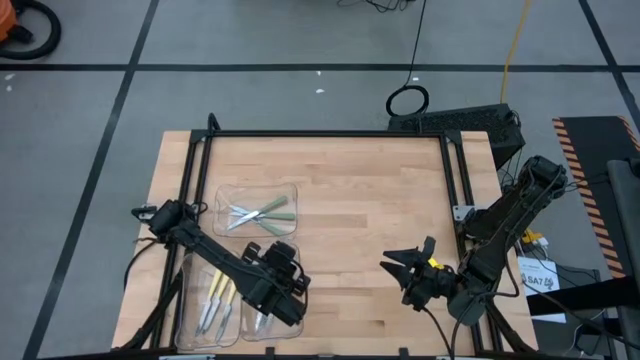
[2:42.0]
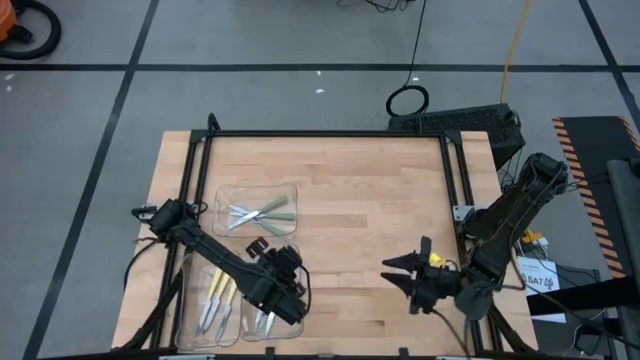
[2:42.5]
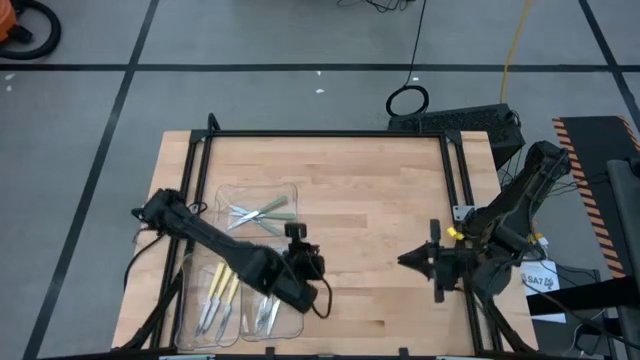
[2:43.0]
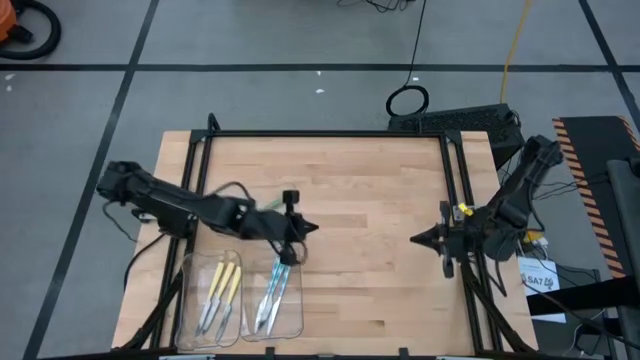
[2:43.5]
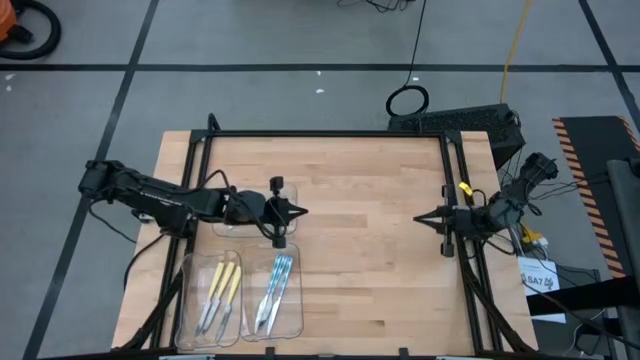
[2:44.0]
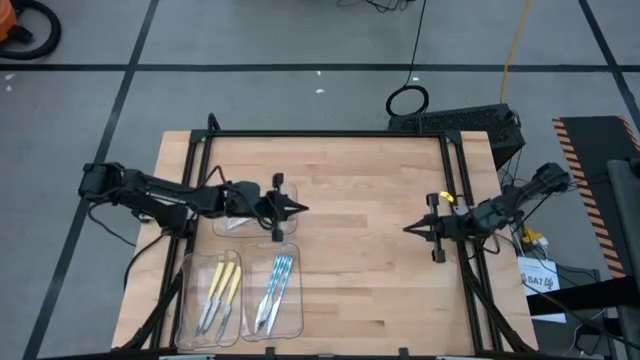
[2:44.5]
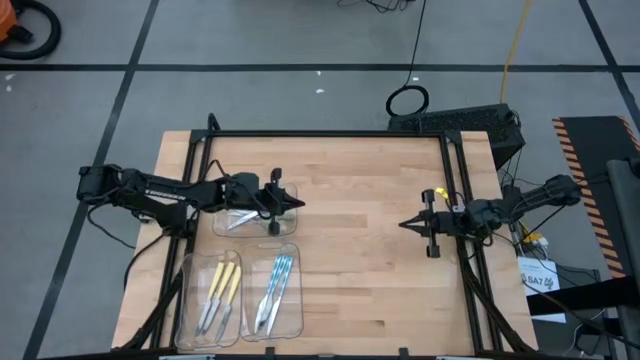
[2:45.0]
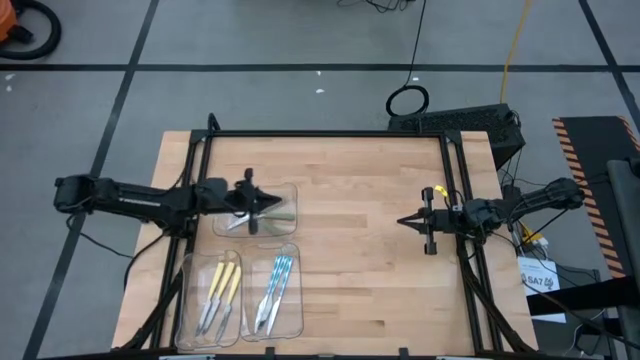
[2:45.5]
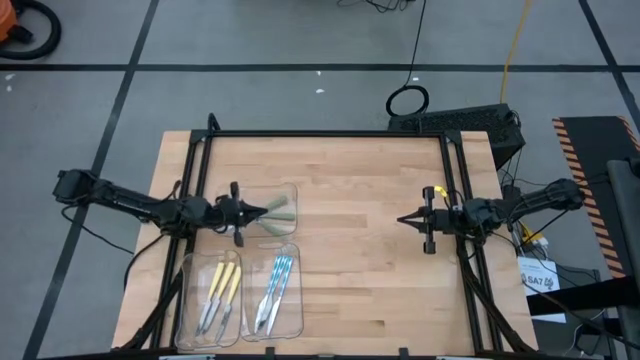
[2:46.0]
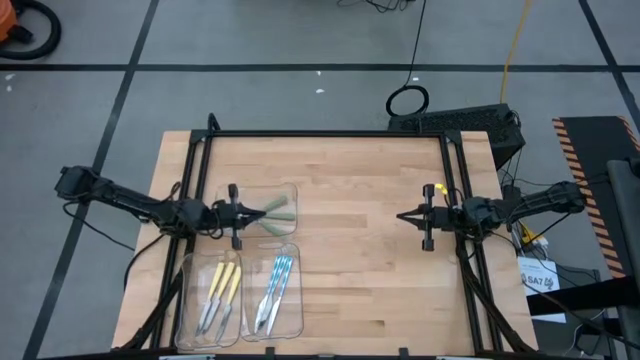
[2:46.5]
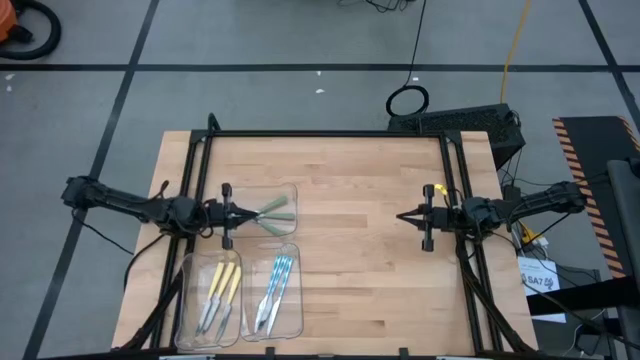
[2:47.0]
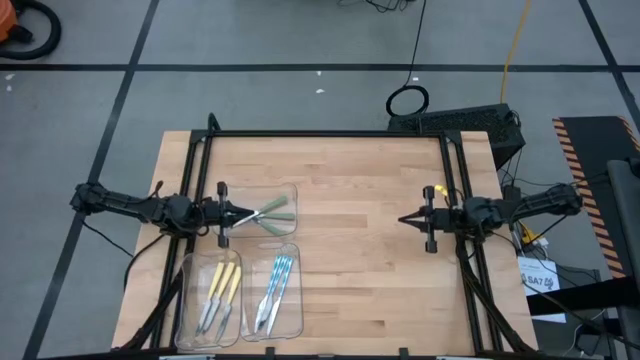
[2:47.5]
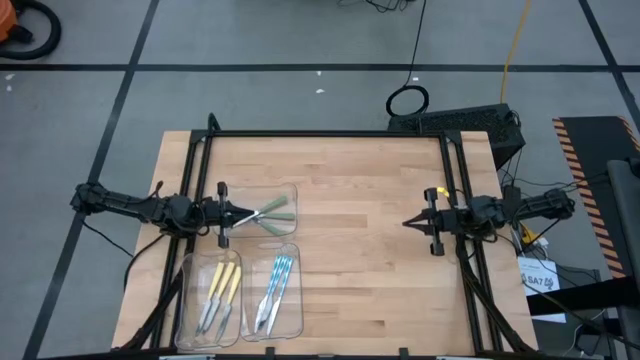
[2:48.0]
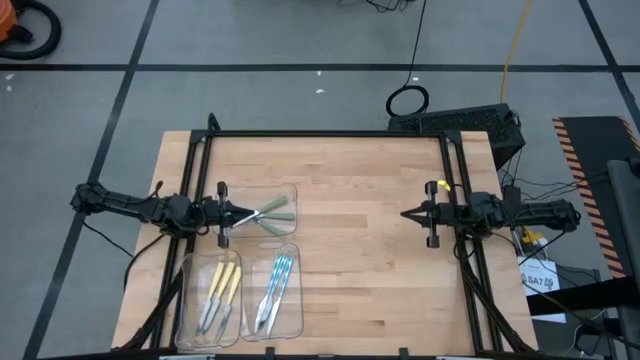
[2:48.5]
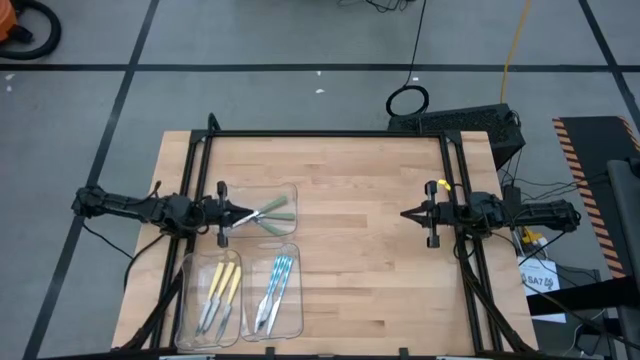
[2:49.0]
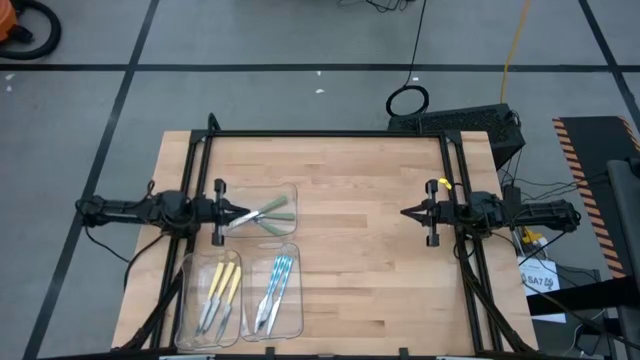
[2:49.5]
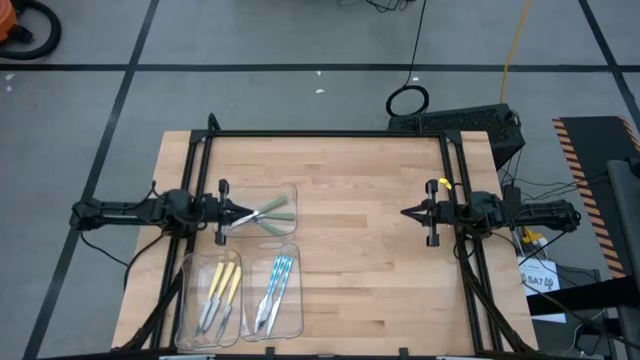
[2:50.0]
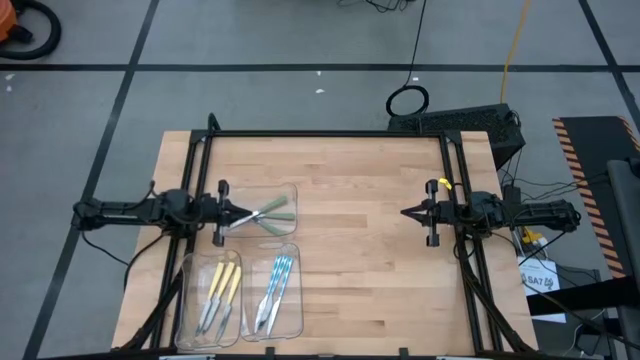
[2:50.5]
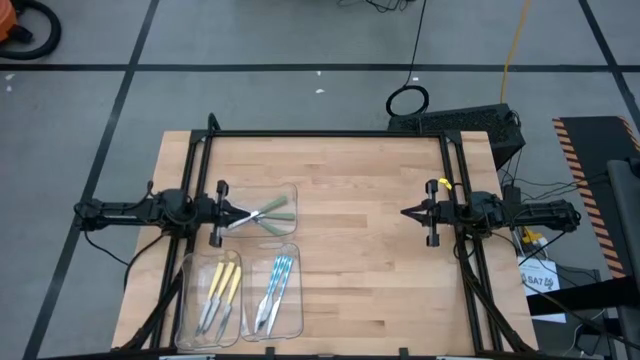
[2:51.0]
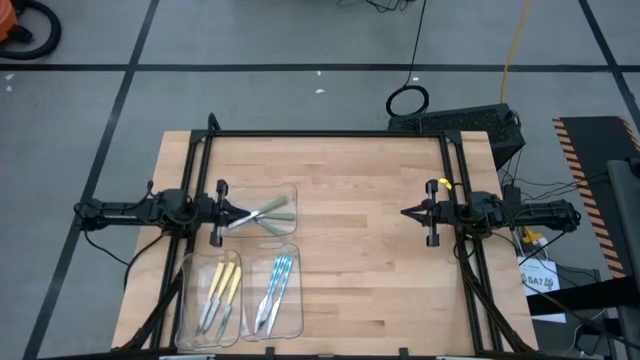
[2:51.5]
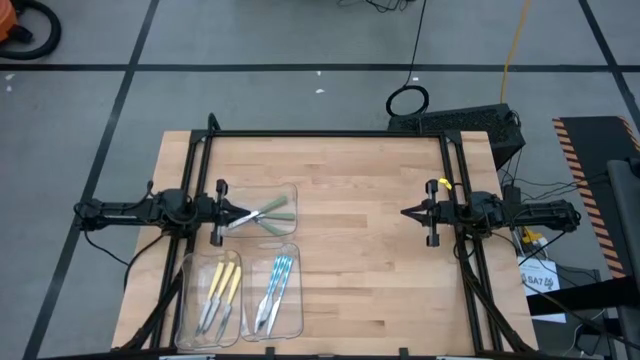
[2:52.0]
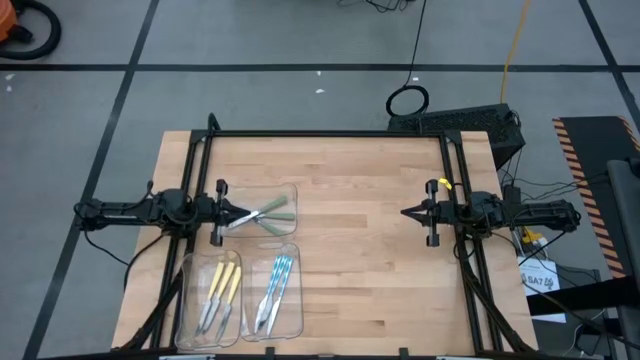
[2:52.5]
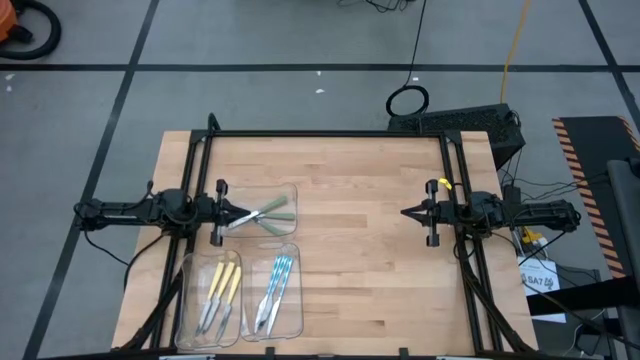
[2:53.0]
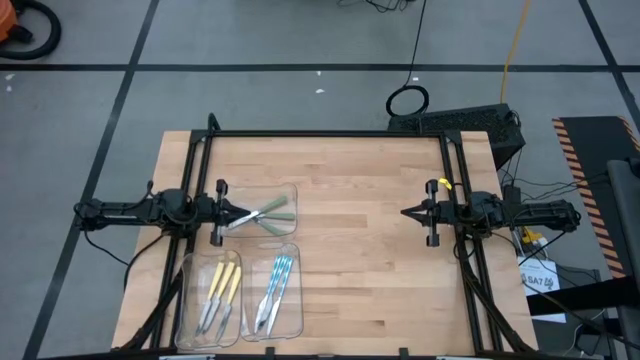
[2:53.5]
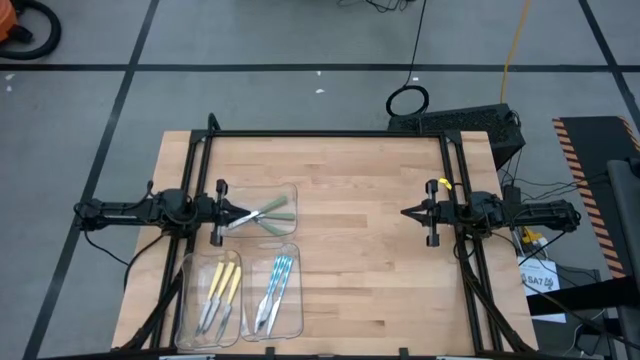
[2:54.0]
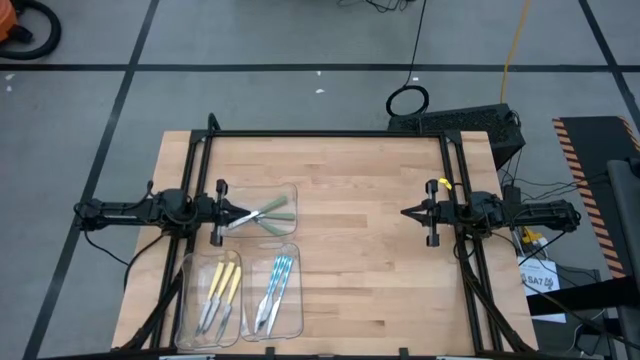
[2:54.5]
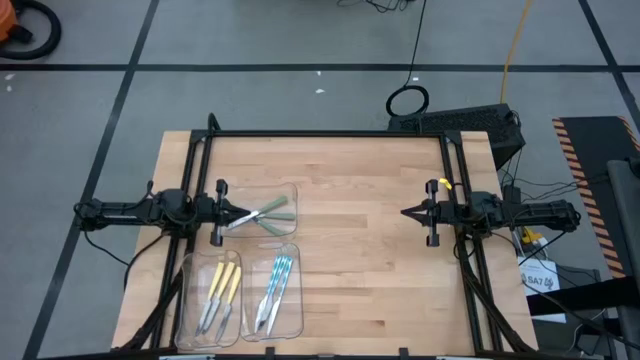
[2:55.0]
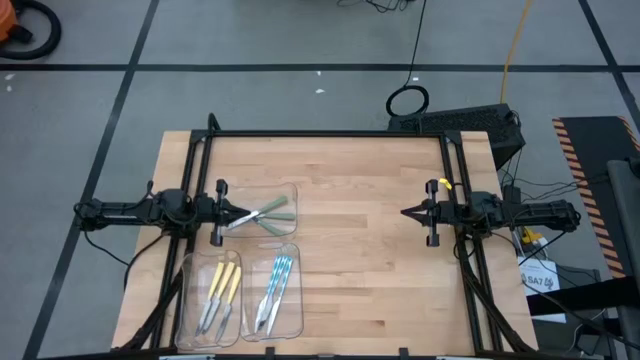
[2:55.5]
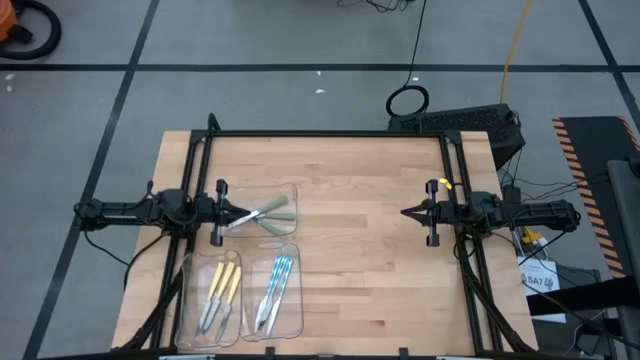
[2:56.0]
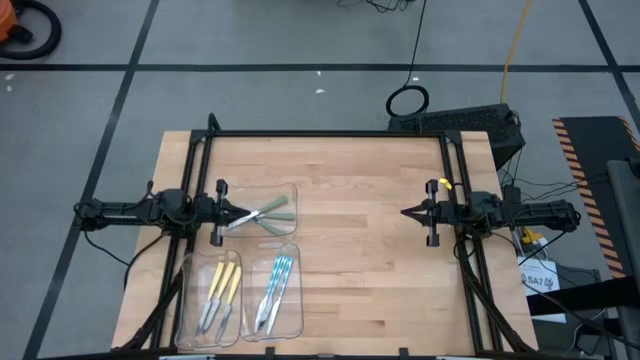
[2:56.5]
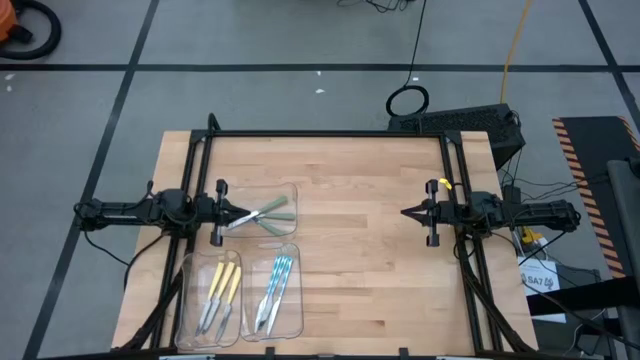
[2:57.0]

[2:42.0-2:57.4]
Task: Sort silverware by color (type)
Return to Home Position

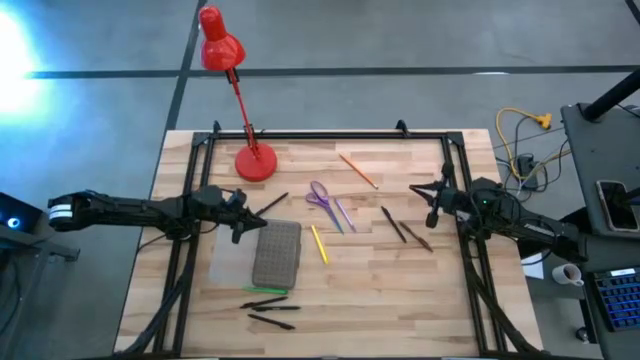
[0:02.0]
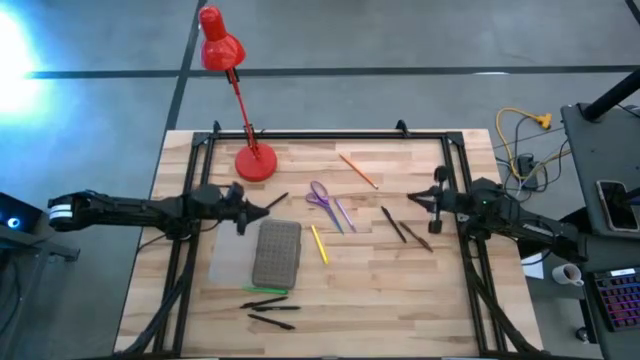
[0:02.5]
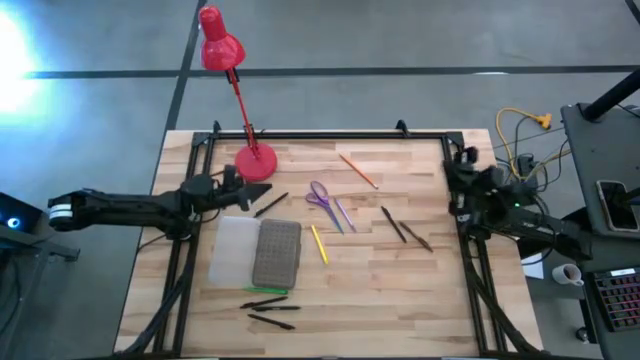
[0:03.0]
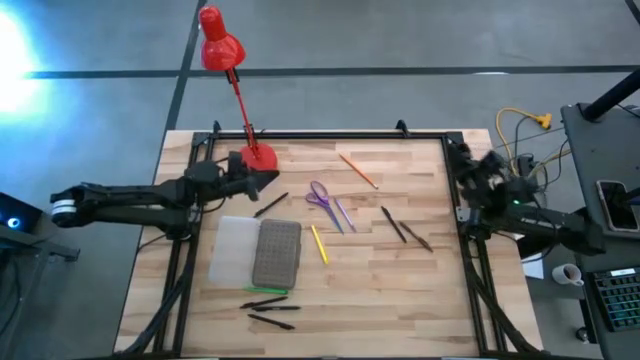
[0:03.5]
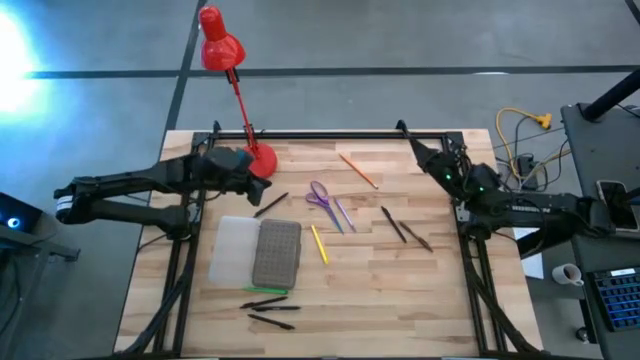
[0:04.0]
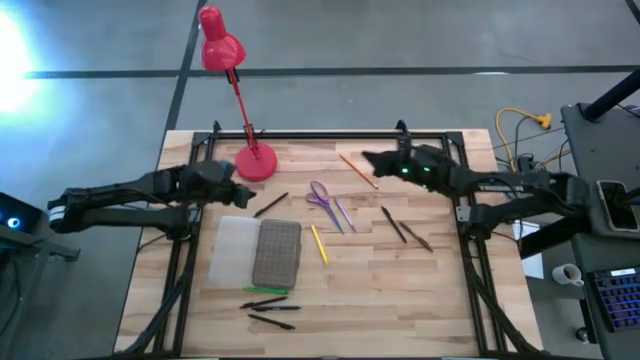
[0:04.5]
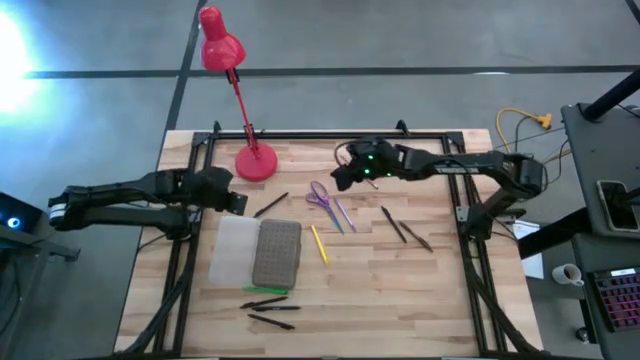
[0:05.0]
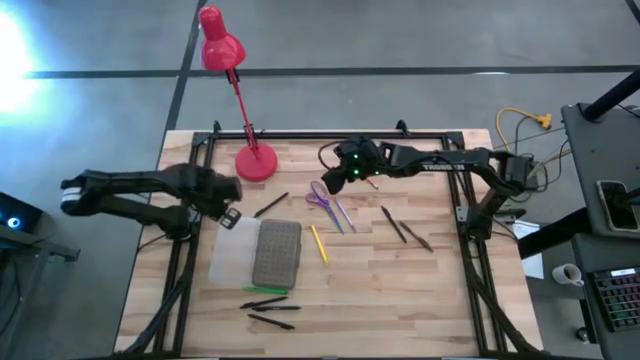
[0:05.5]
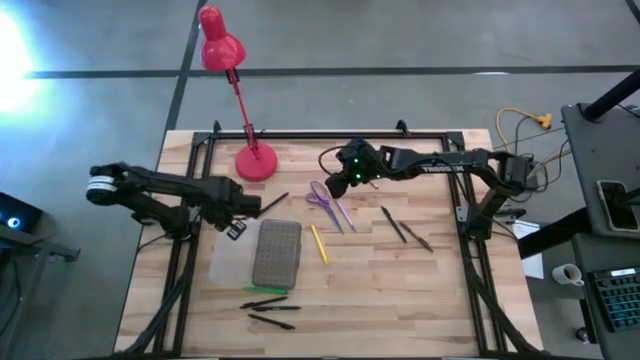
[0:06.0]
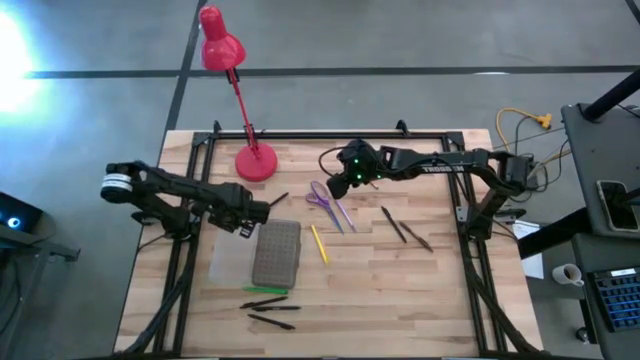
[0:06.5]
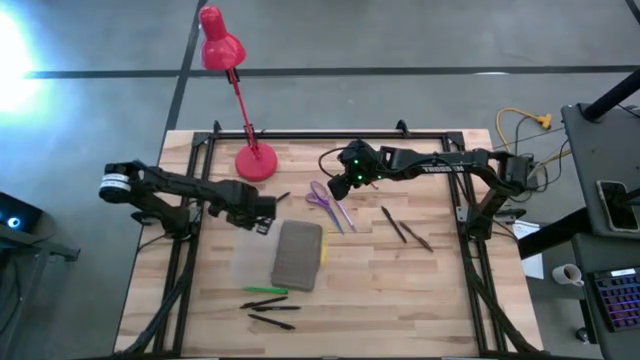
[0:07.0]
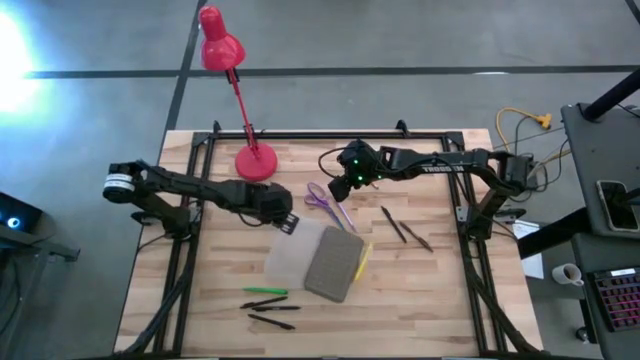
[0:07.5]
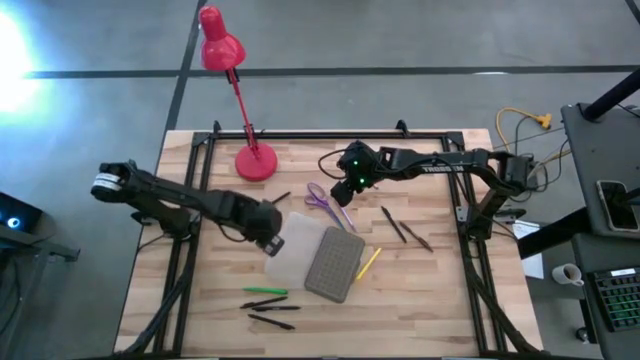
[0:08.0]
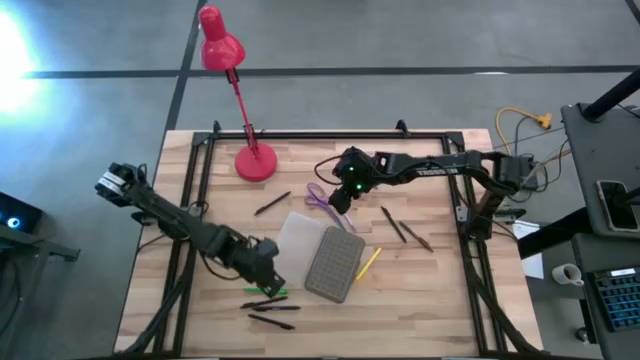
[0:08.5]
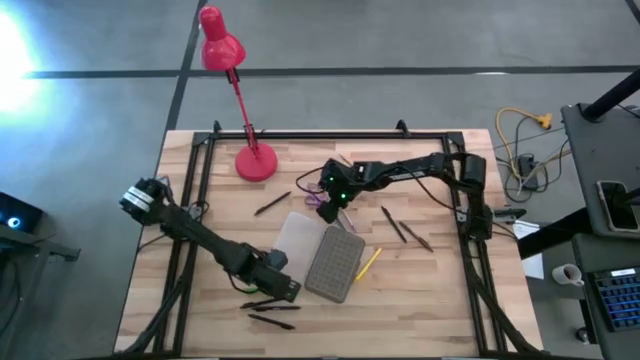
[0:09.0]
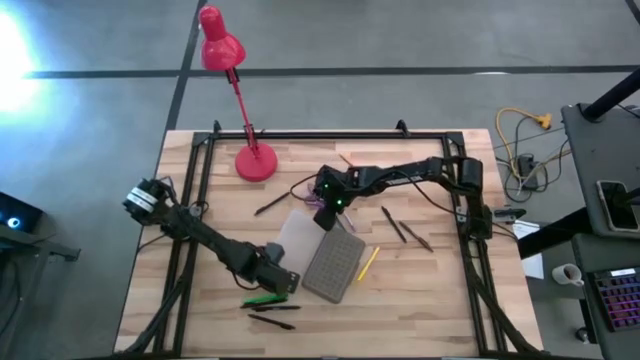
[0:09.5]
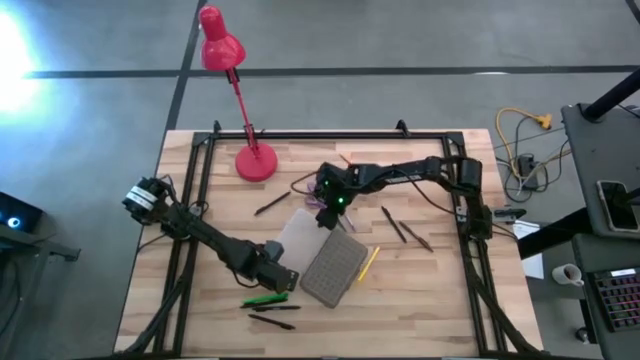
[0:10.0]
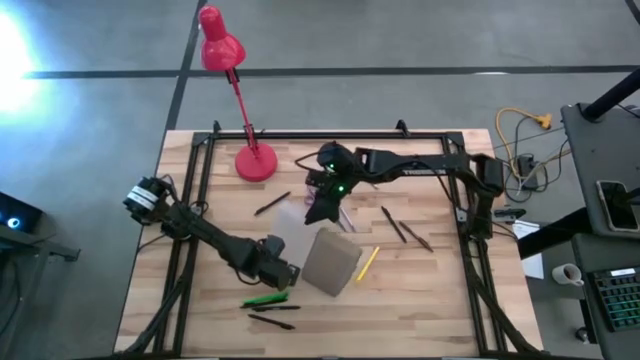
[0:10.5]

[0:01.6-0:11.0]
Task: Pick & place school supplies into a supply box
Prepare the supply box
